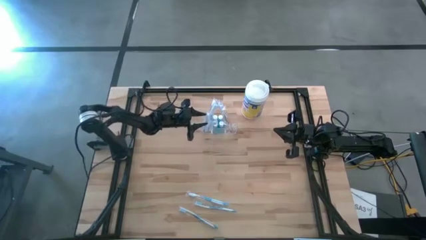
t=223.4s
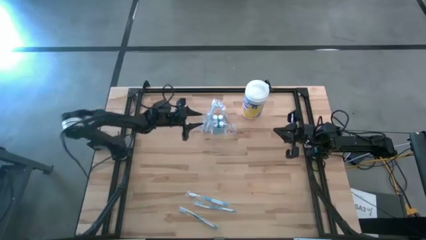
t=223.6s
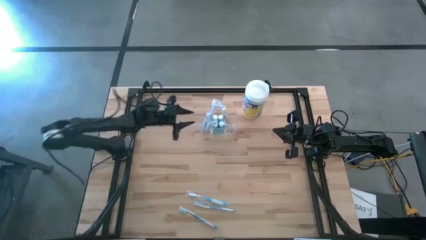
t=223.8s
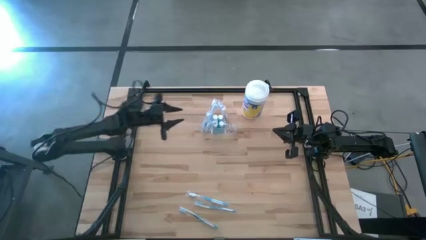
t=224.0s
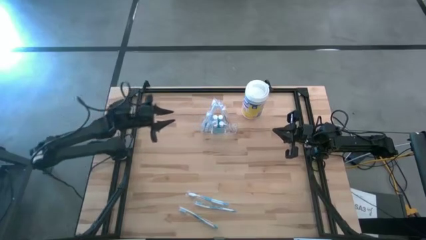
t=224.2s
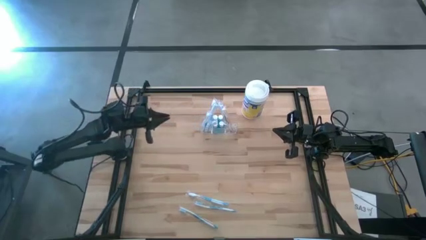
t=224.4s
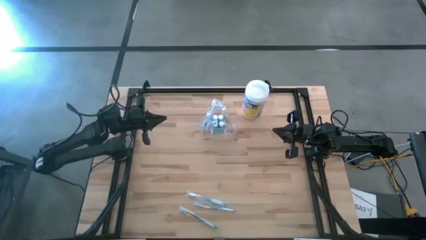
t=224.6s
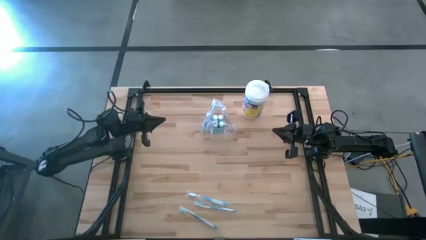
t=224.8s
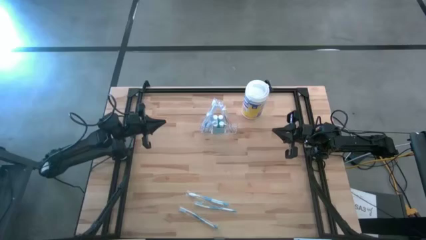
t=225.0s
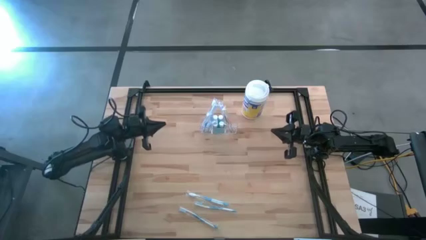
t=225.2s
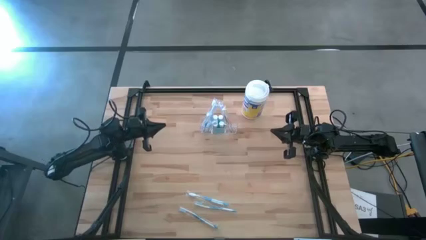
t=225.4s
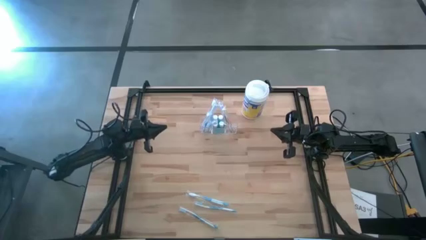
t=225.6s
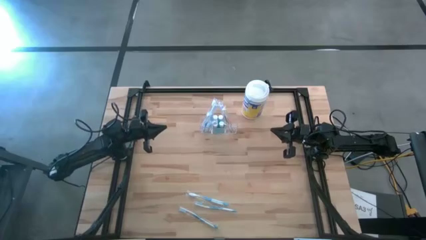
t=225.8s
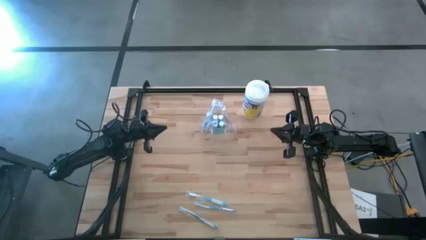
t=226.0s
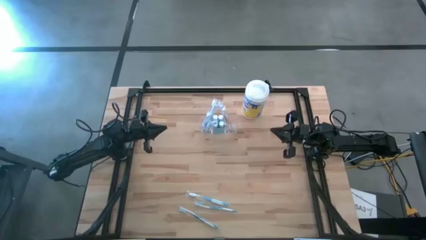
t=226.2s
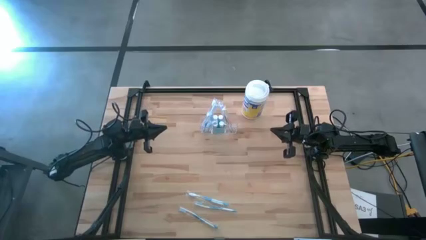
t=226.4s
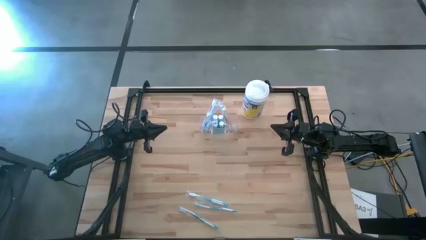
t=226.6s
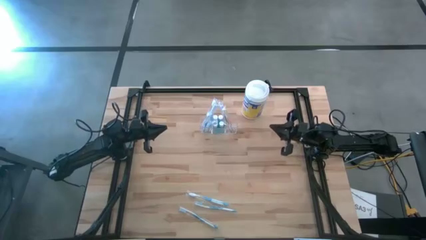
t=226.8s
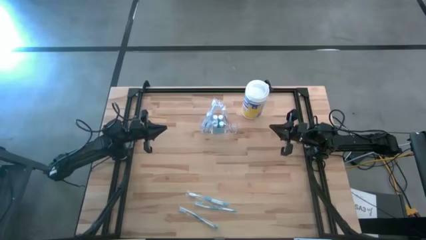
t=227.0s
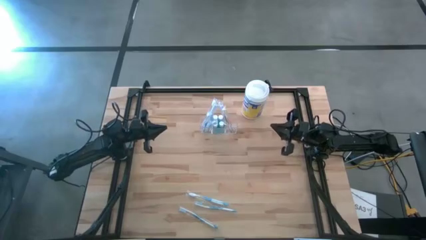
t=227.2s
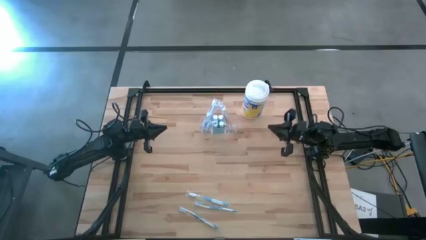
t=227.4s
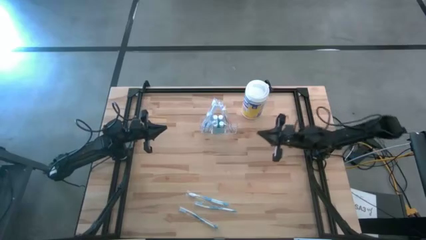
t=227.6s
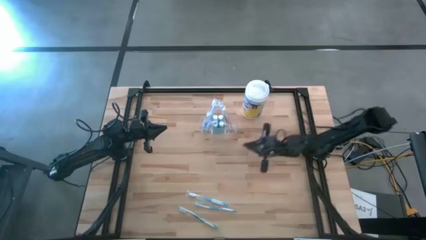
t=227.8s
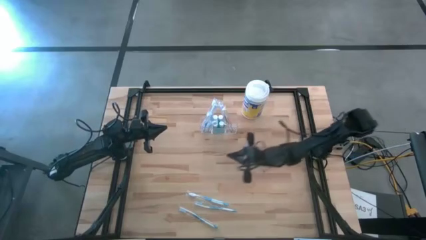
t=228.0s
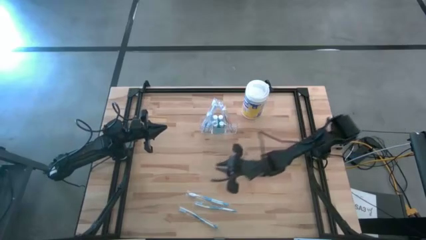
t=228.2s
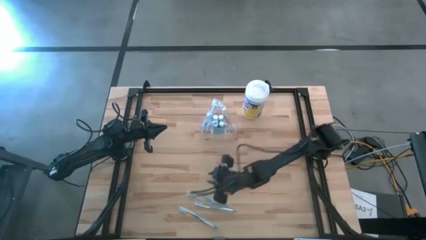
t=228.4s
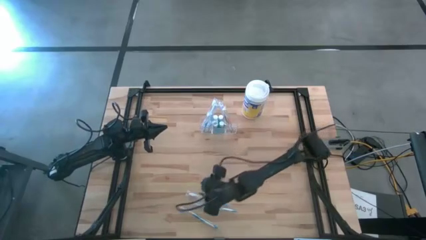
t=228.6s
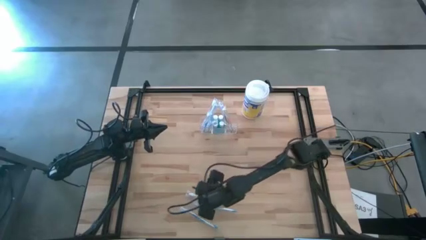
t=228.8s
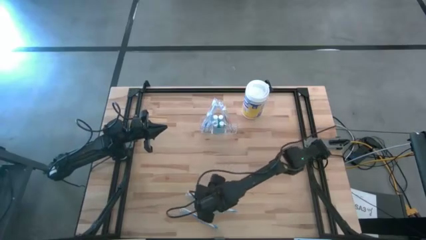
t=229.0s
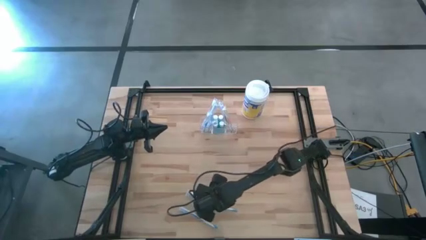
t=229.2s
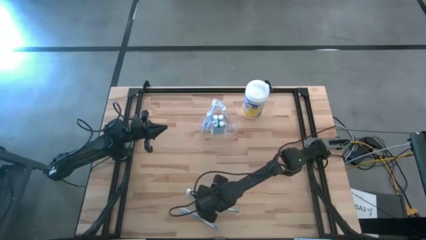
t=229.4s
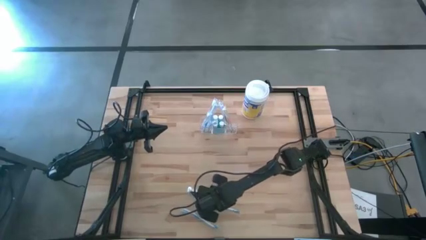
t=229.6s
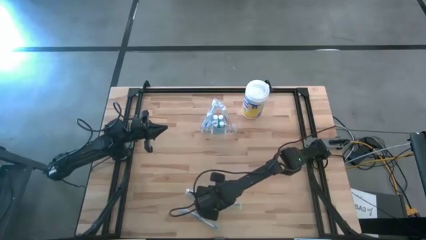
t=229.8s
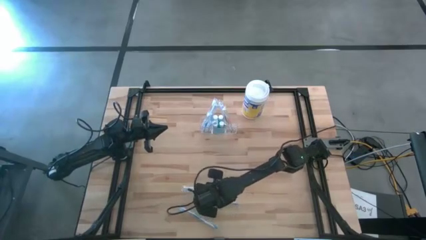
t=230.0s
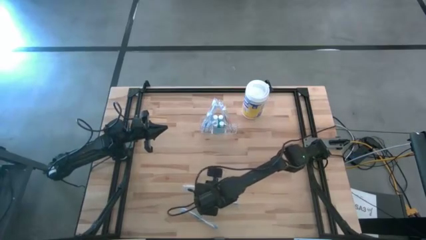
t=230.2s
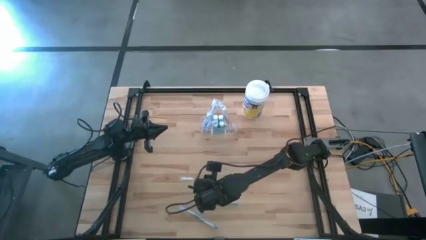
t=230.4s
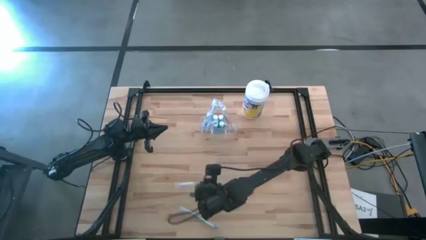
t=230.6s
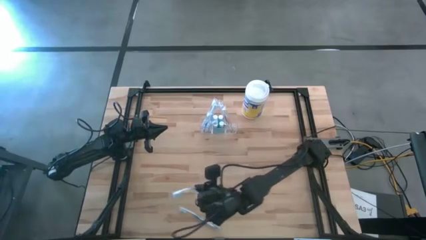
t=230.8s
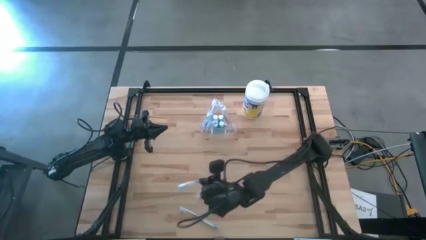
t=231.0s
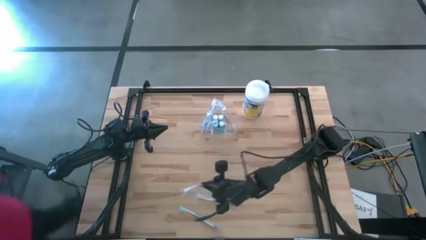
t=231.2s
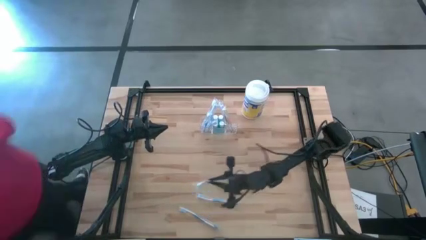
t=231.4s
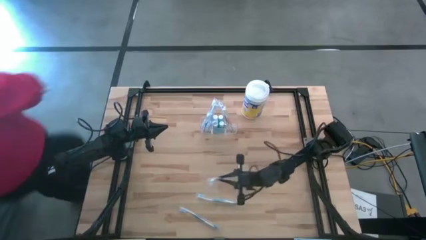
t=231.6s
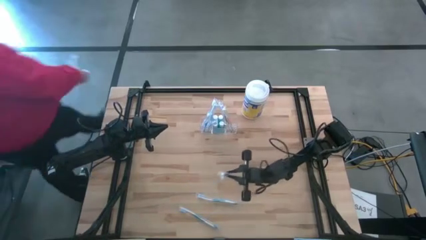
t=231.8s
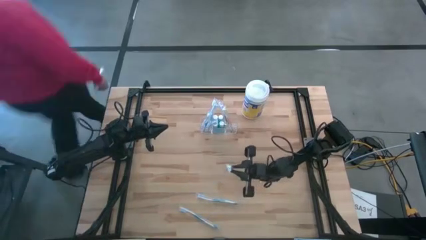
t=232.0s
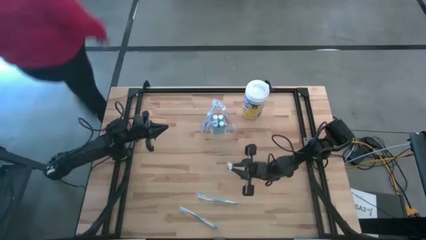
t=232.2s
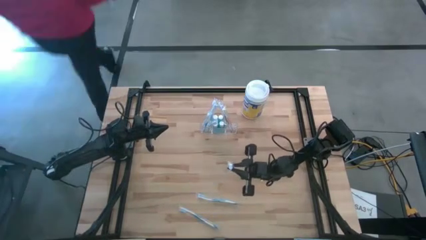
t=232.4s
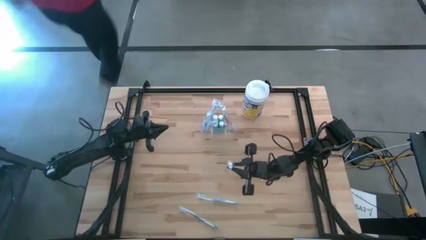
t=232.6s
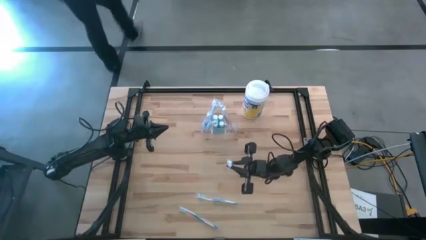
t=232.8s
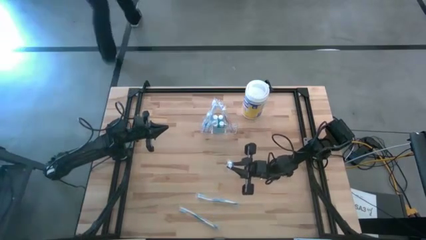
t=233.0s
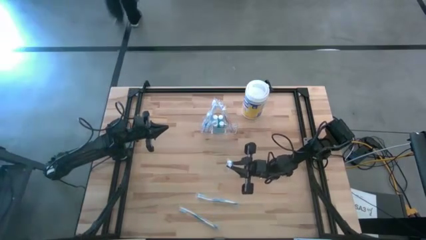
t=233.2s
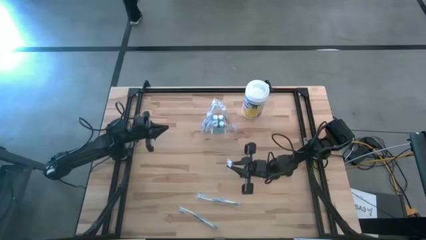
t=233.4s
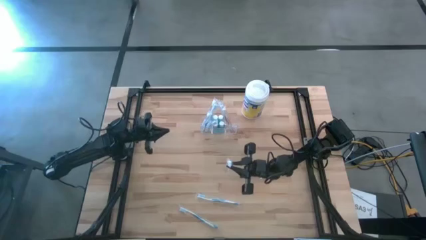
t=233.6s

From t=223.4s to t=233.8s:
Task: Pick & Place toothbrushing station
Put the blue toothbrush into the transparent organizer

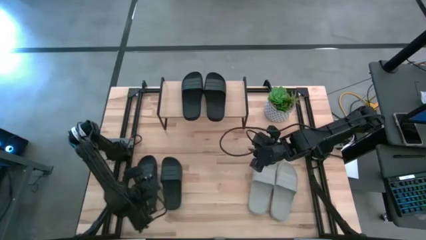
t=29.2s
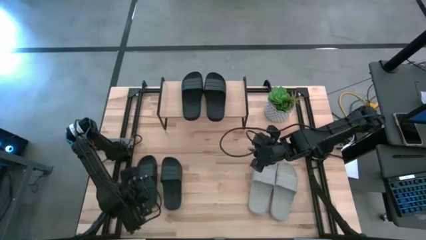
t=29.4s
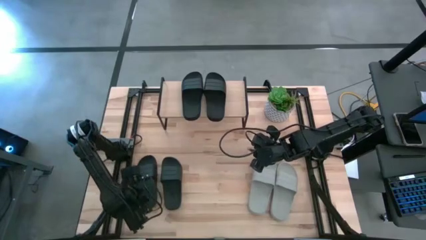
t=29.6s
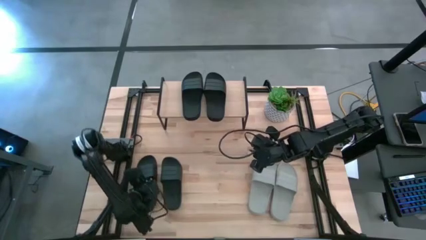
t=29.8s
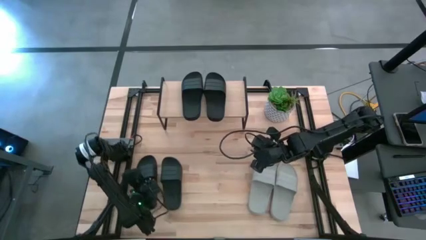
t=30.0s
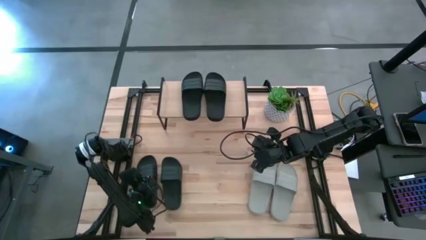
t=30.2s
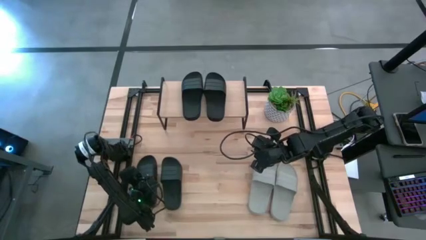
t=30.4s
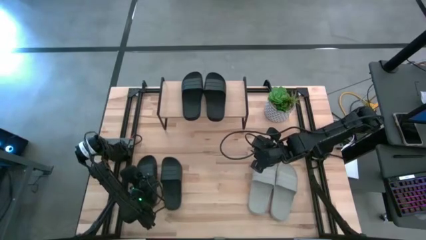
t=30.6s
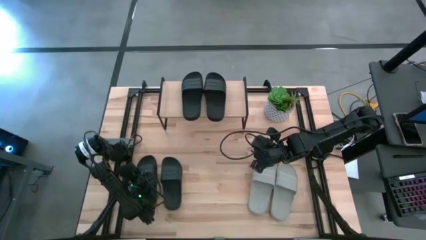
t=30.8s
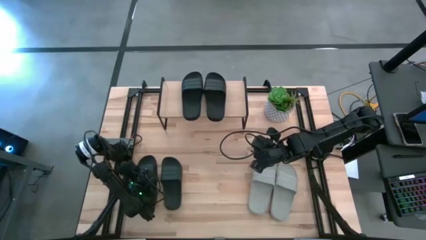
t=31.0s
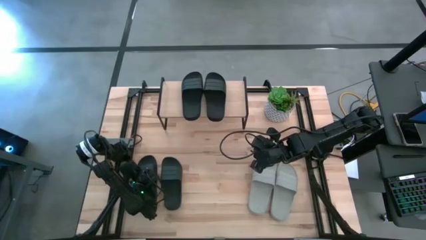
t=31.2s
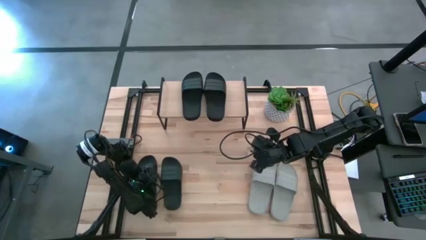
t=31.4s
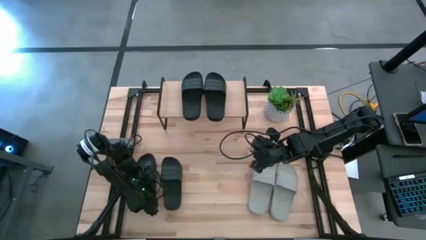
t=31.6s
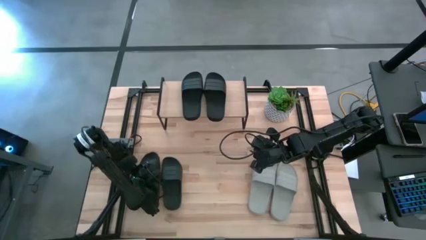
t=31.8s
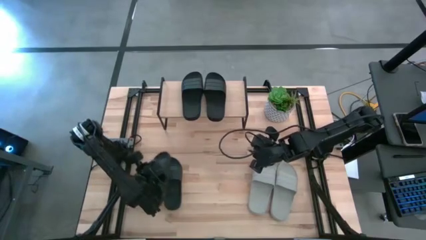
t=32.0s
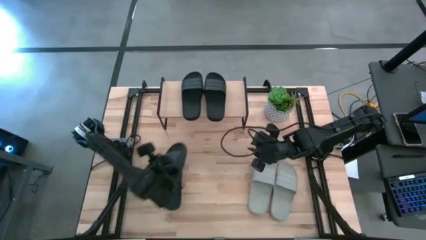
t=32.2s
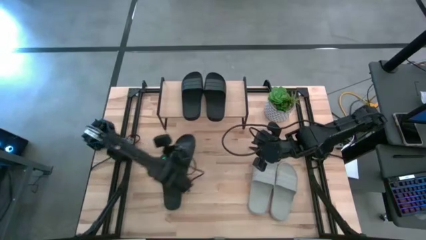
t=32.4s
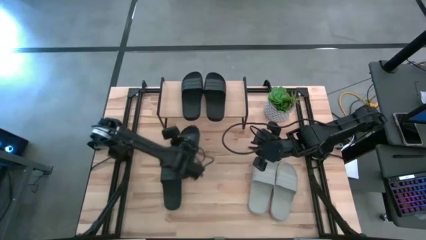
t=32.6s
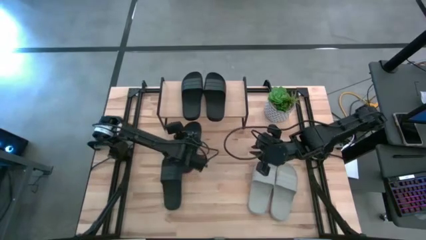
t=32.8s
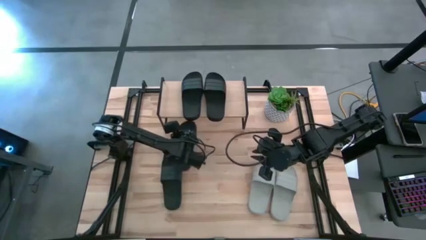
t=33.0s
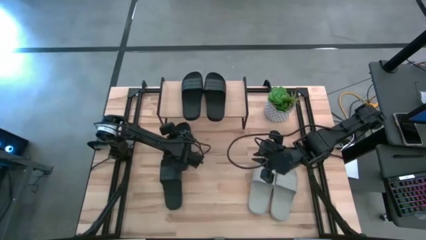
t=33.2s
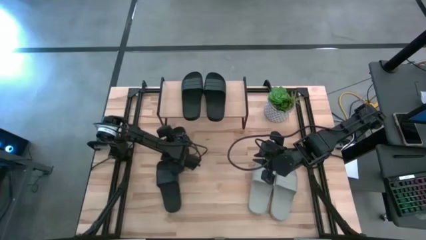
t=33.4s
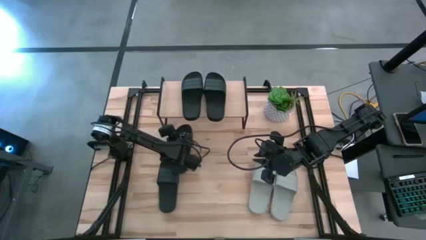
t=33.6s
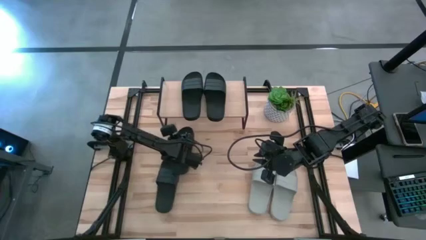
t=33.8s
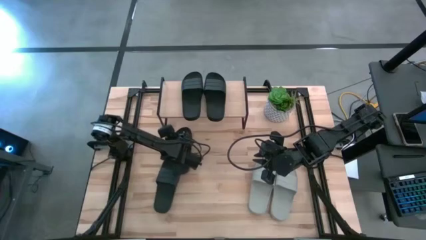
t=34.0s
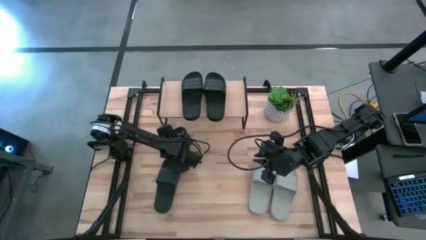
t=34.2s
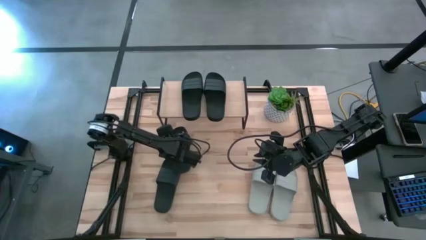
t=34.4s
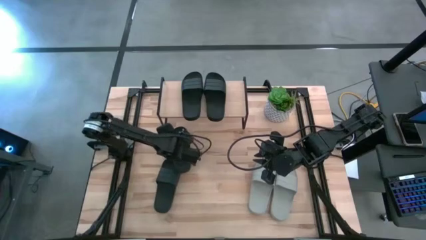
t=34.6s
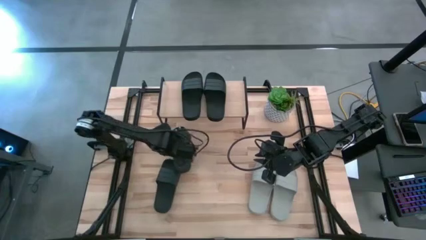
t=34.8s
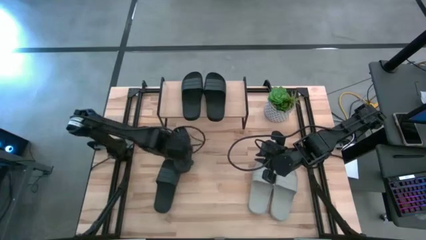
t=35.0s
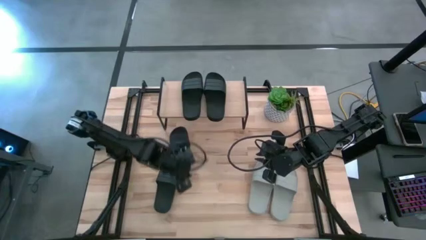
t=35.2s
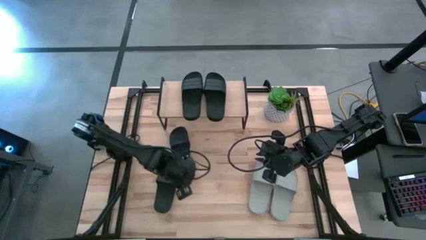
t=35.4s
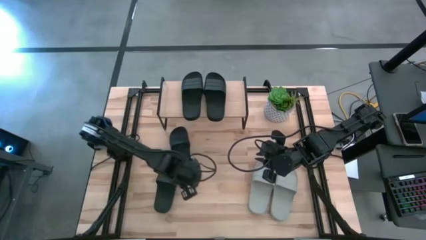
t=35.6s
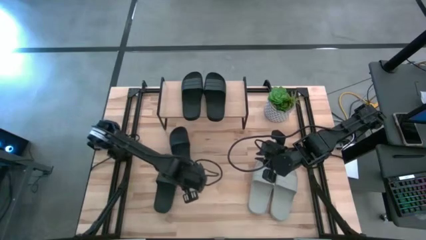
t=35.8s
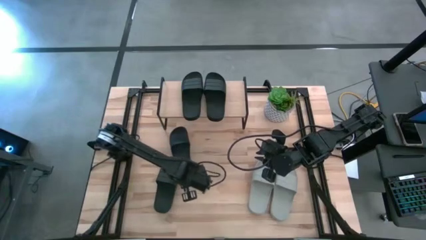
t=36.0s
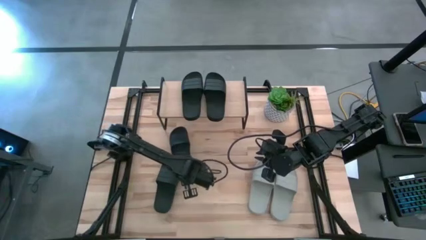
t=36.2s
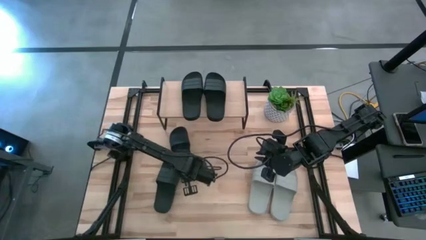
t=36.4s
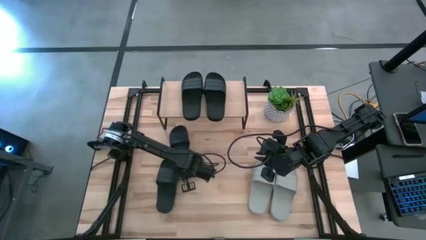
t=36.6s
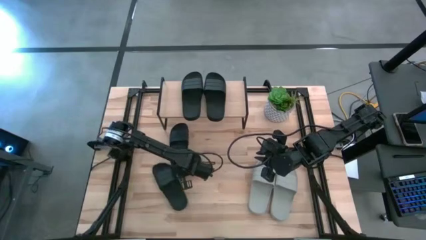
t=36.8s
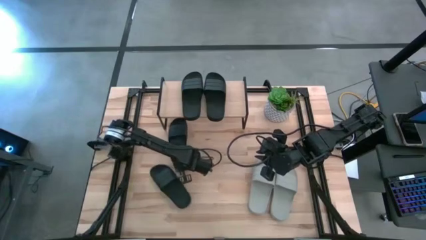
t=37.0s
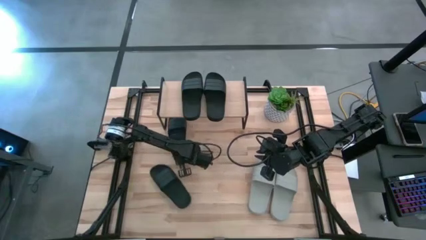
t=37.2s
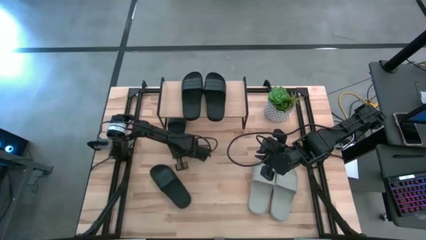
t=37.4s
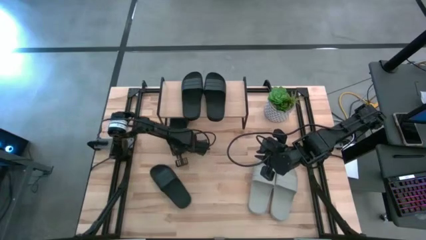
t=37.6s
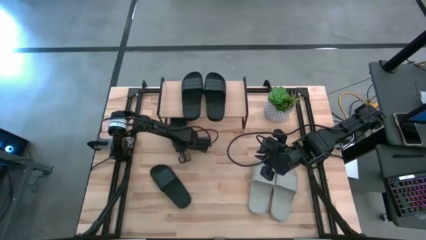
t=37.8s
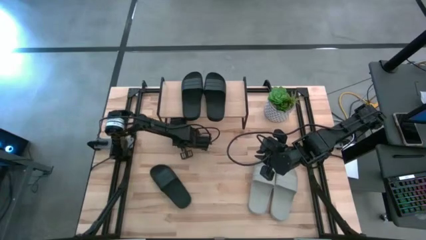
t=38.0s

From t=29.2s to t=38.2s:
Task: Pick and place slides into the shelf
Put the black slide under the shelf
